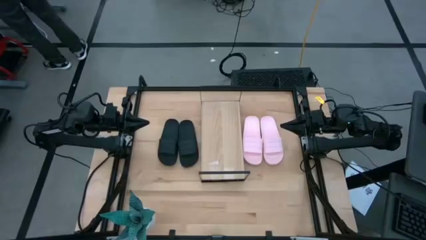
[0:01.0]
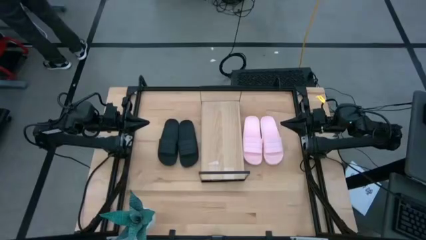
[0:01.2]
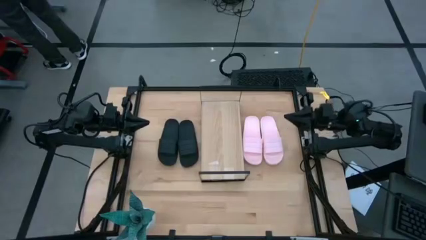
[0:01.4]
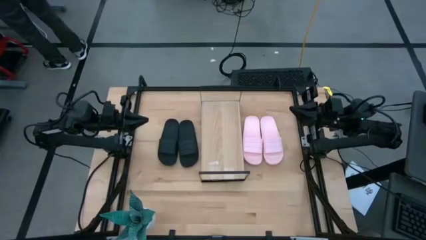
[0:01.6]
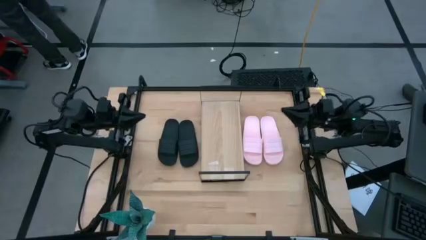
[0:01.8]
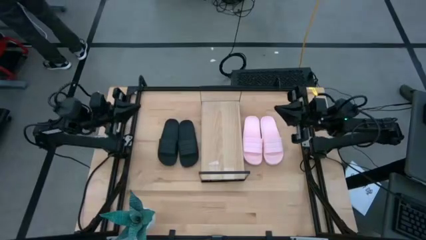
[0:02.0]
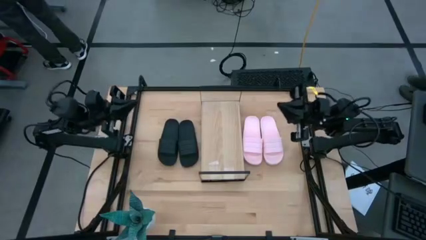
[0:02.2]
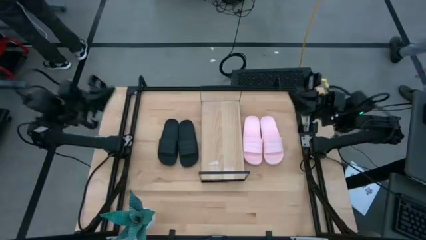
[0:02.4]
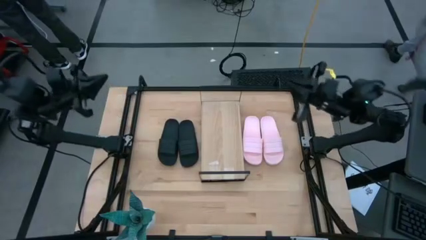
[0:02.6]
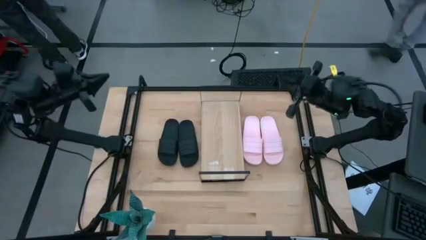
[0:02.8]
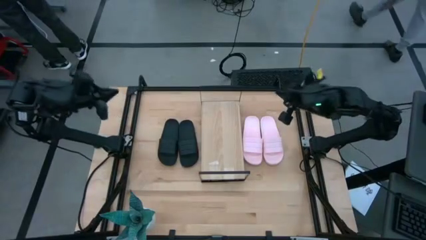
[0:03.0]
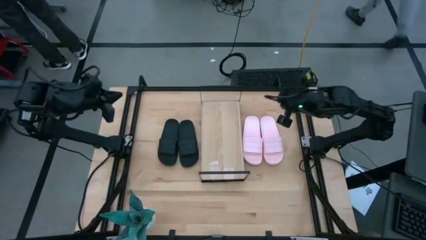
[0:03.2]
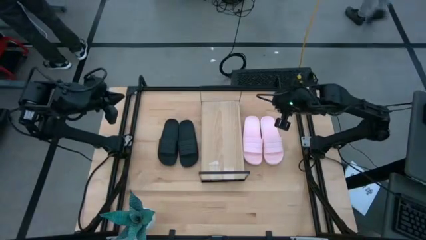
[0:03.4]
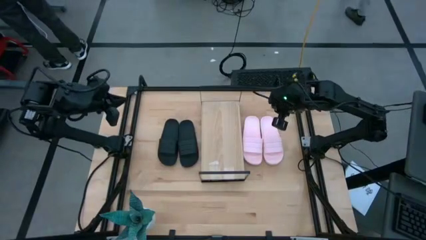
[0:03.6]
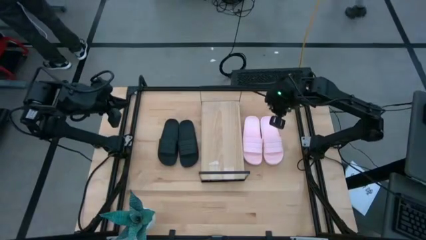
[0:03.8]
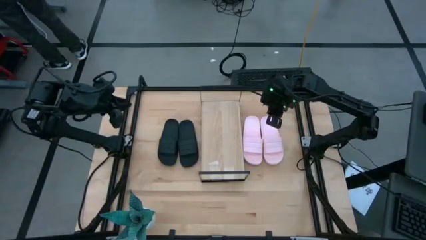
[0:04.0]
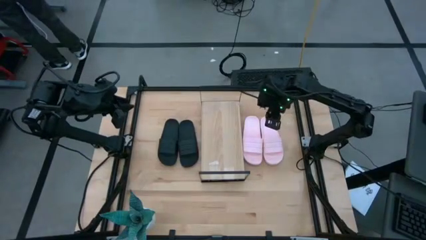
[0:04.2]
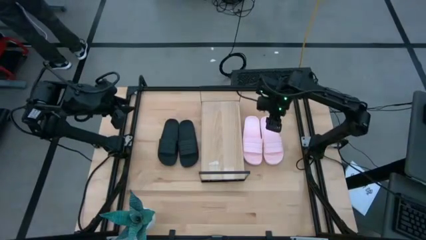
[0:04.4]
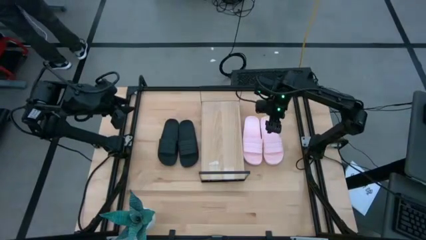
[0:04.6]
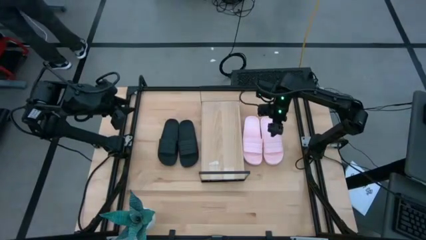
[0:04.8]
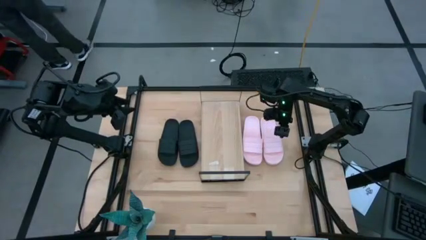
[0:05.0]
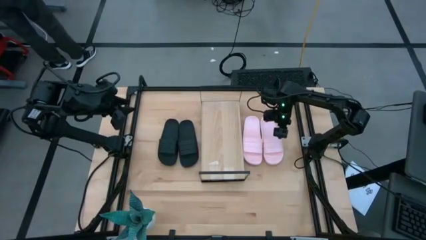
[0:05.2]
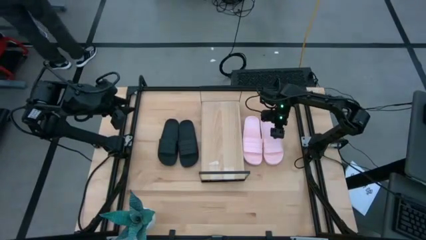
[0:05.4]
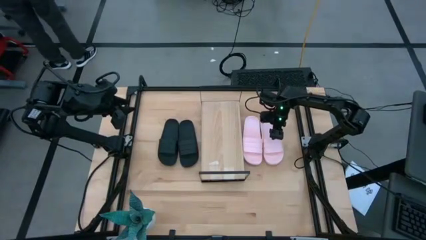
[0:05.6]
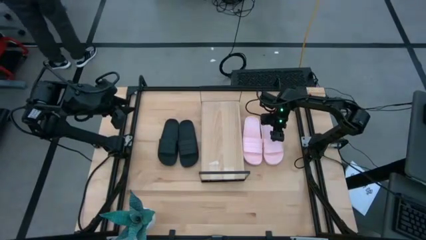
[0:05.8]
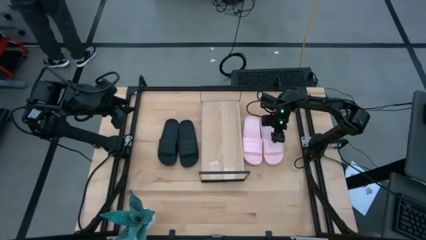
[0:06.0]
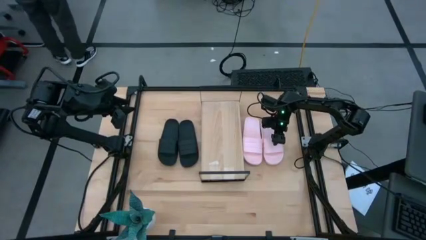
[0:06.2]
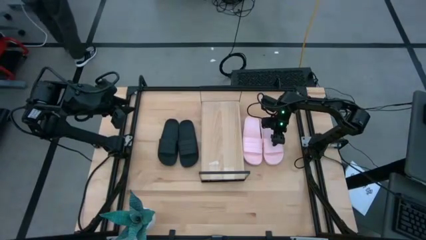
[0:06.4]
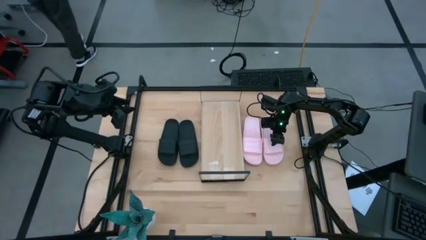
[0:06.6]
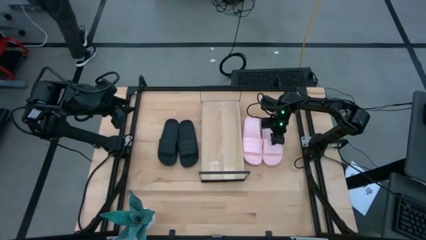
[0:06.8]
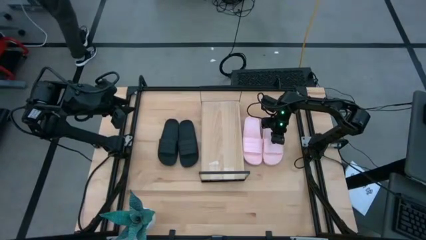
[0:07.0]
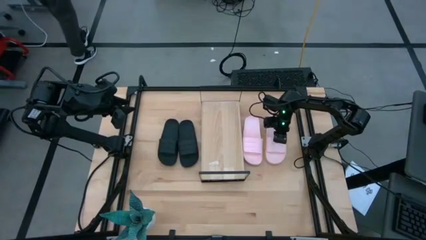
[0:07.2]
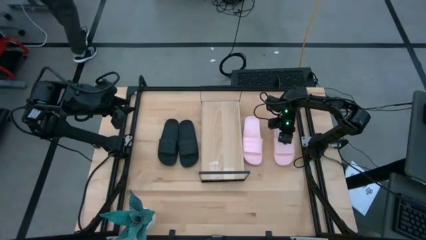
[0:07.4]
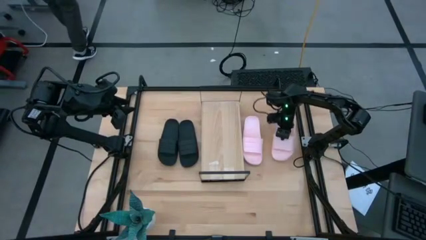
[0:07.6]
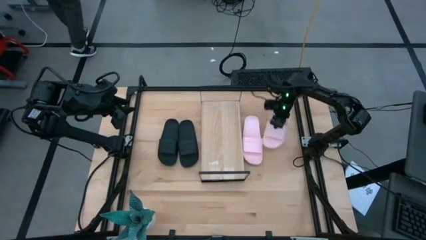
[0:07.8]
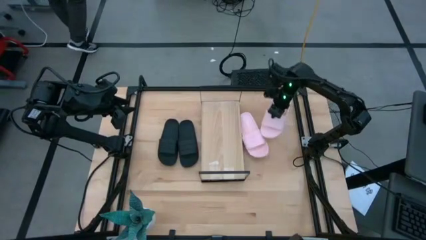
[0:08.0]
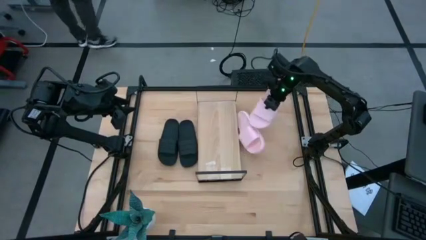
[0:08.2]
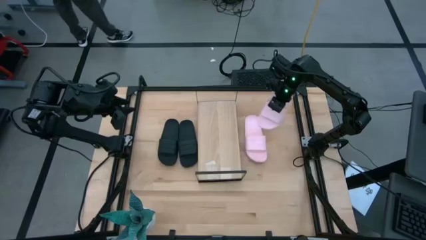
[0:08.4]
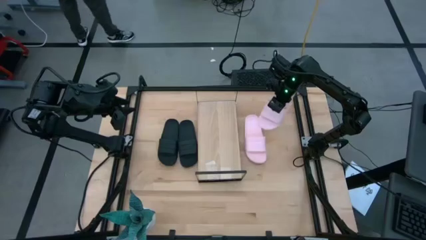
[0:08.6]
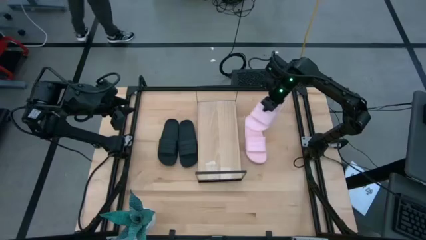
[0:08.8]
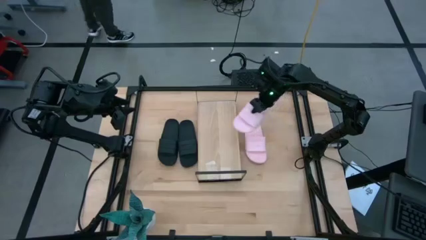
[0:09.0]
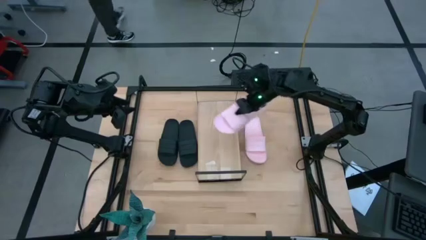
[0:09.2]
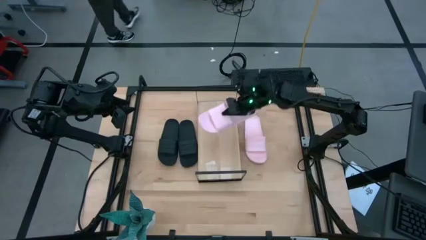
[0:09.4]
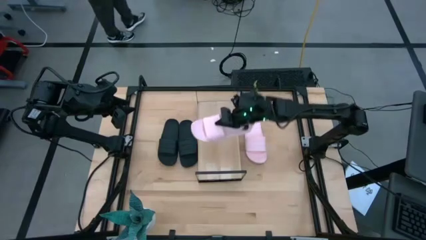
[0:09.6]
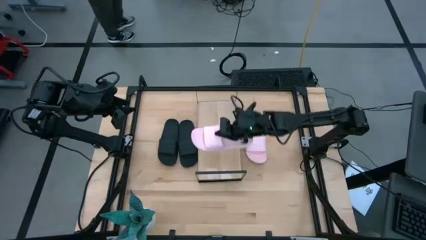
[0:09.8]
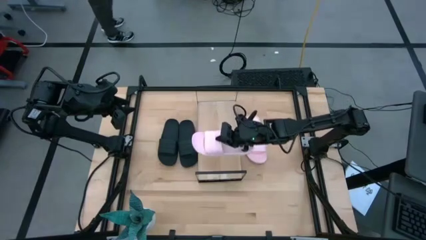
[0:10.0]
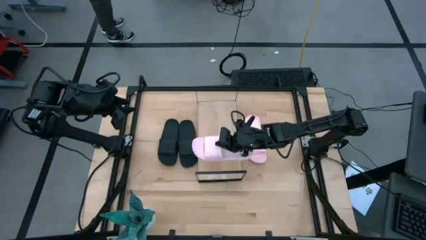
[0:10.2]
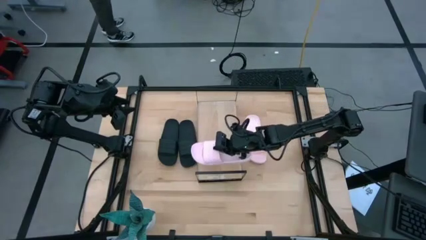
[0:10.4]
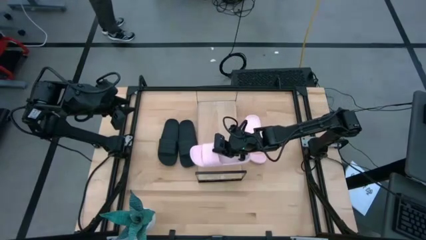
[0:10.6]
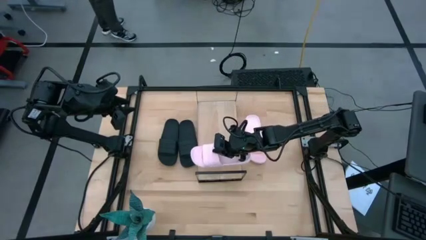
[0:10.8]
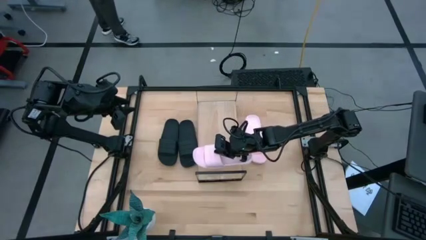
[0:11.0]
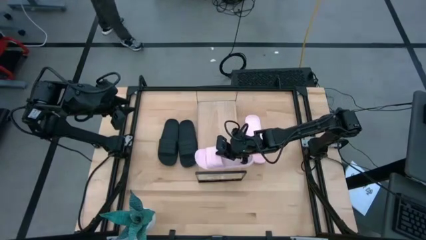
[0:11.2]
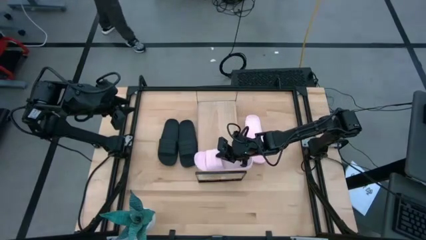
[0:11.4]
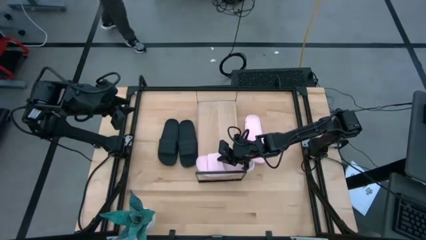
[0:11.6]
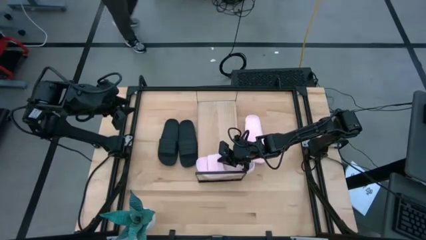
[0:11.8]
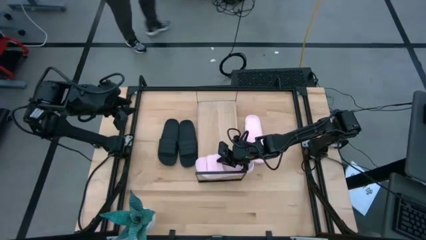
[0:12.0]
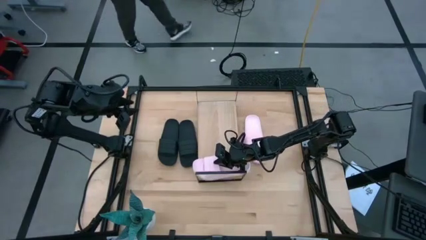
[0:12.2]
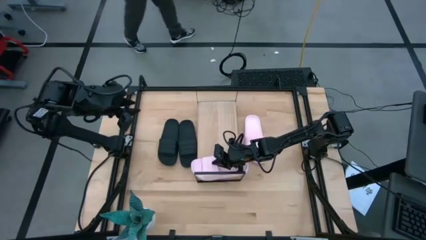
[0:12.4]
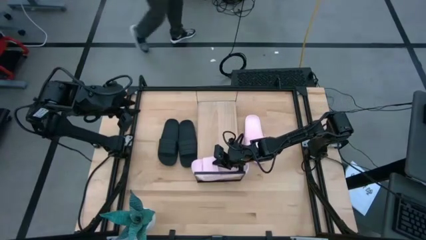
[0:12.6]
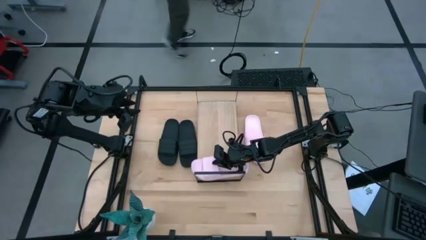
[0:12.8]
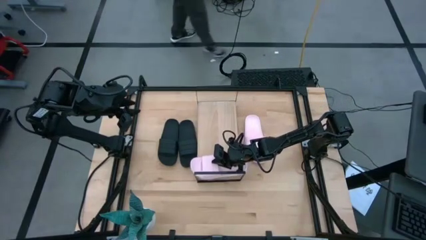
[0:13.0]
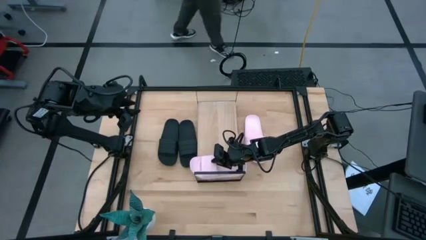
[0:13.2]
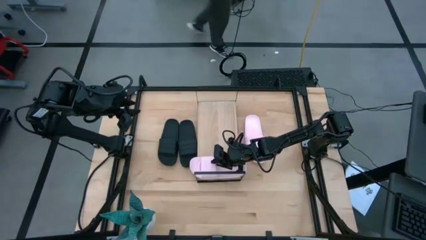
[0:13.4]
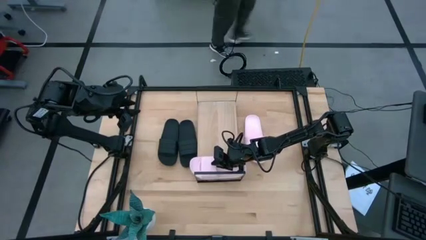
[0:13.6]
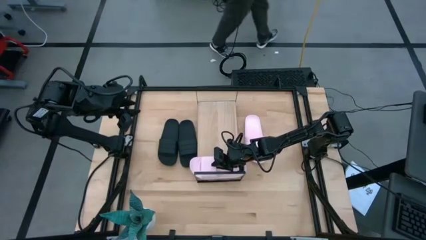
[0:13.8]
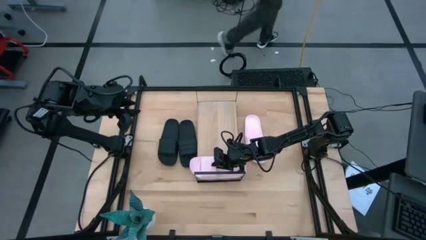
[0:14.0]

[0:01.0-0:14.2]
Task: Pick and place slides into the shelf
Put the right pink slipper on the shelf
